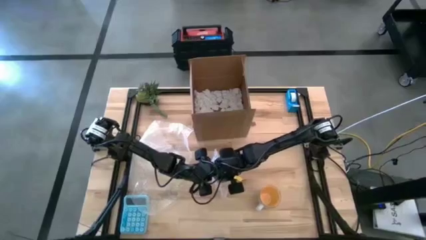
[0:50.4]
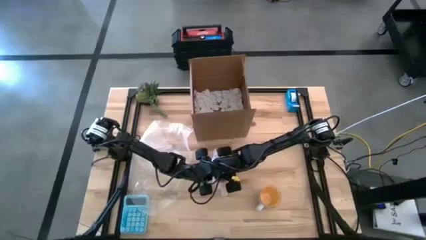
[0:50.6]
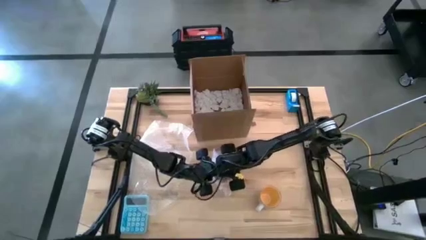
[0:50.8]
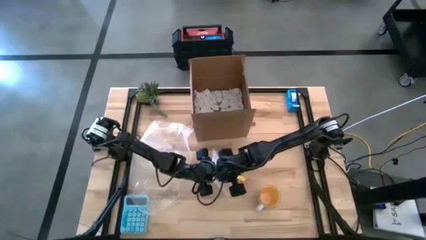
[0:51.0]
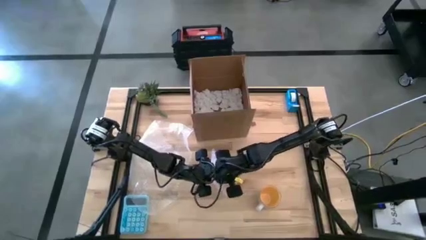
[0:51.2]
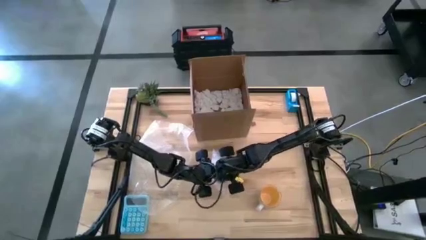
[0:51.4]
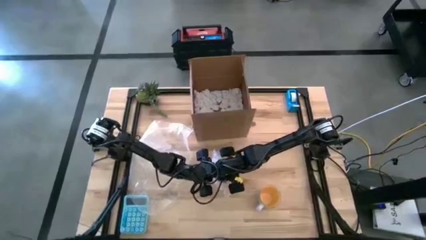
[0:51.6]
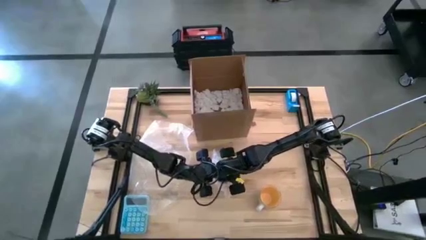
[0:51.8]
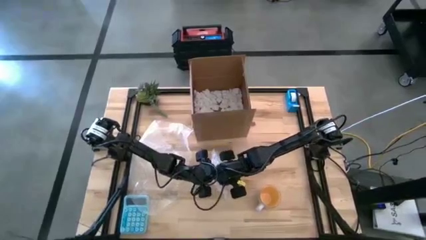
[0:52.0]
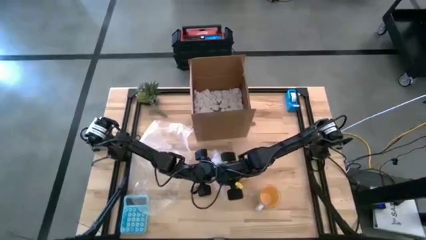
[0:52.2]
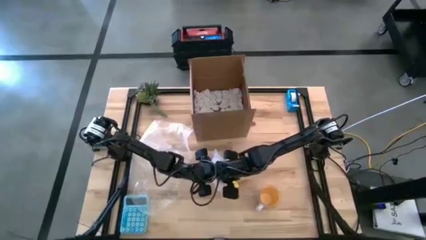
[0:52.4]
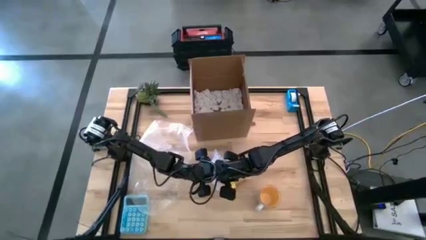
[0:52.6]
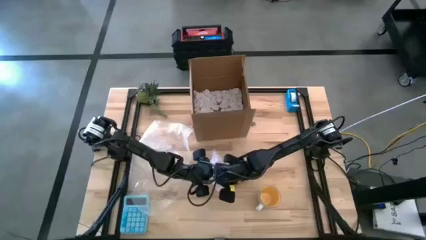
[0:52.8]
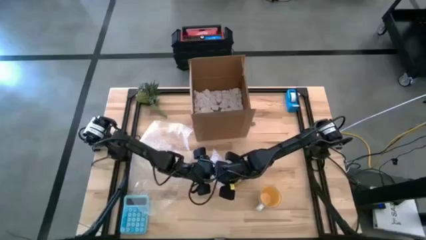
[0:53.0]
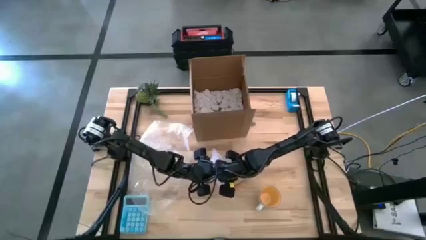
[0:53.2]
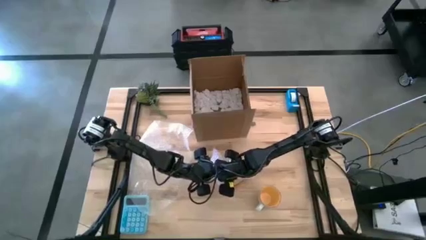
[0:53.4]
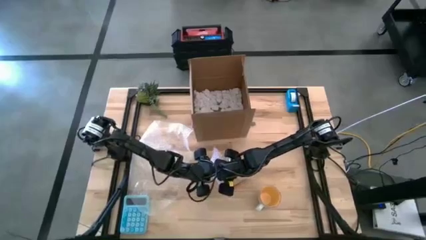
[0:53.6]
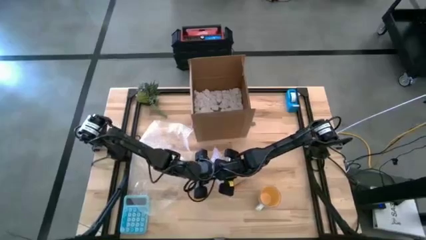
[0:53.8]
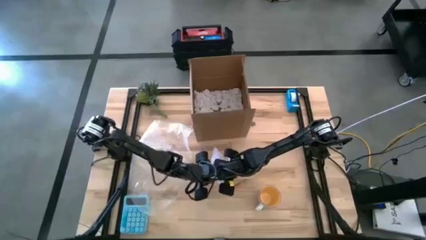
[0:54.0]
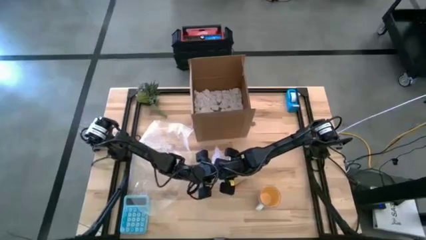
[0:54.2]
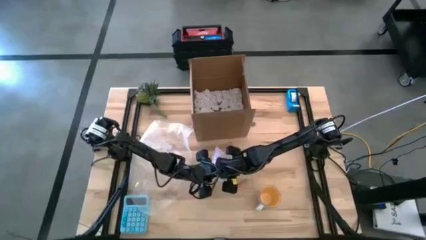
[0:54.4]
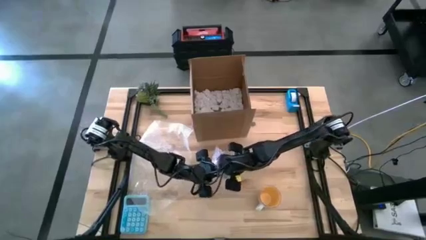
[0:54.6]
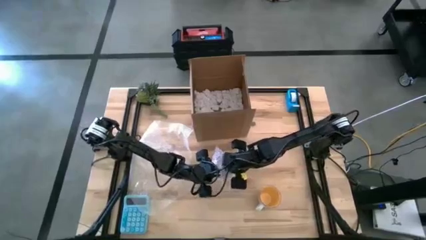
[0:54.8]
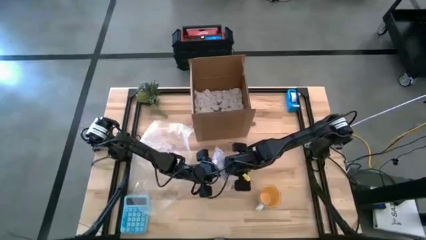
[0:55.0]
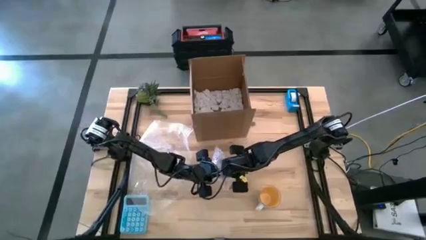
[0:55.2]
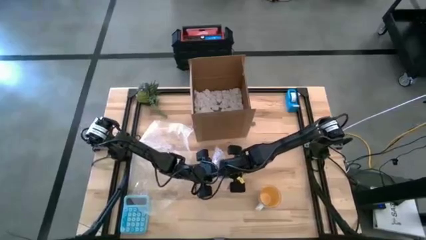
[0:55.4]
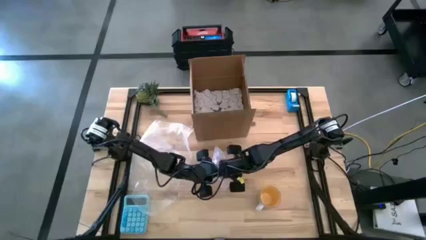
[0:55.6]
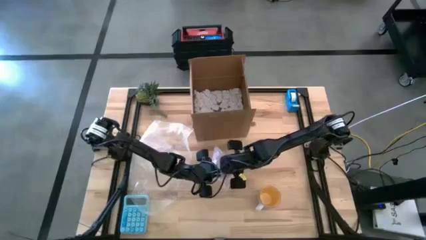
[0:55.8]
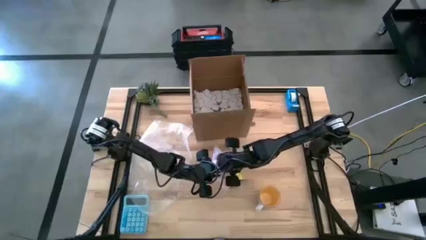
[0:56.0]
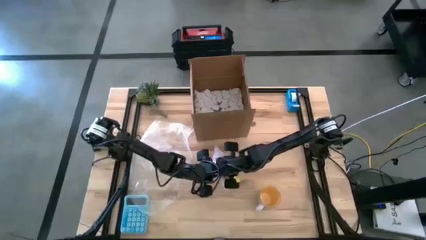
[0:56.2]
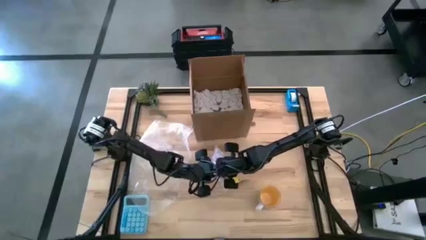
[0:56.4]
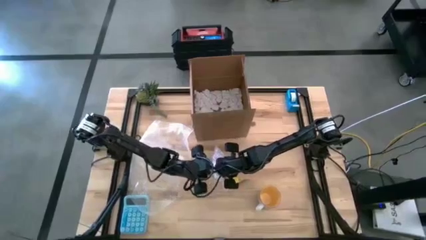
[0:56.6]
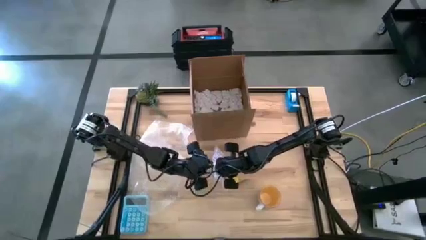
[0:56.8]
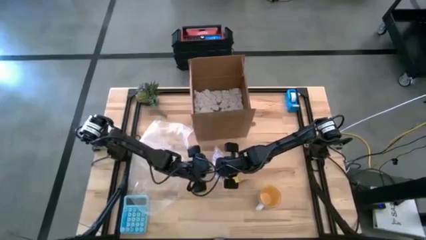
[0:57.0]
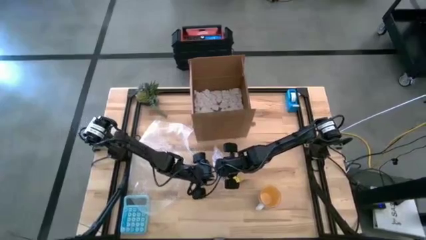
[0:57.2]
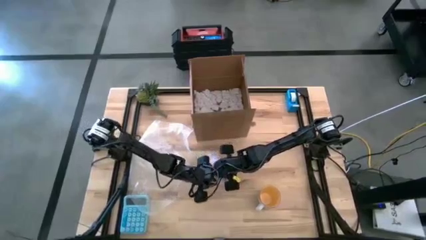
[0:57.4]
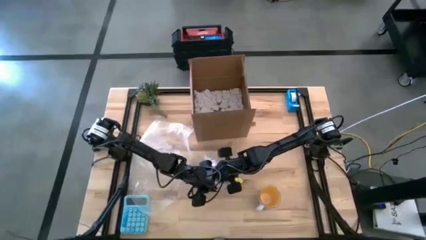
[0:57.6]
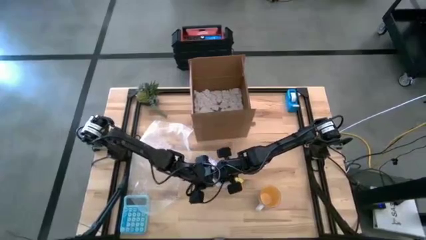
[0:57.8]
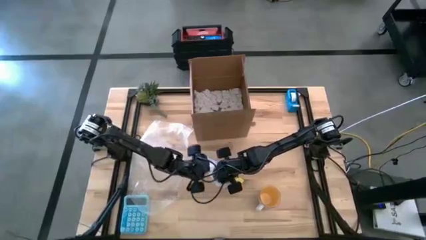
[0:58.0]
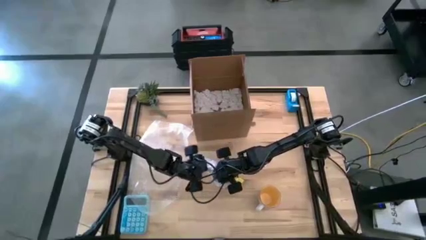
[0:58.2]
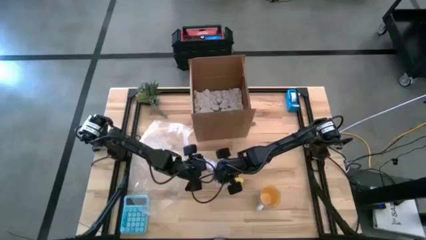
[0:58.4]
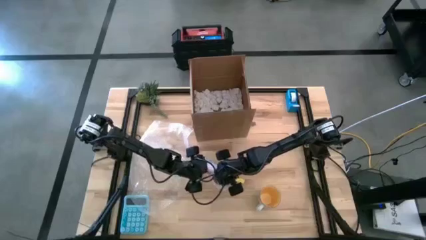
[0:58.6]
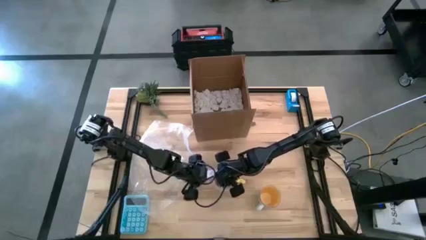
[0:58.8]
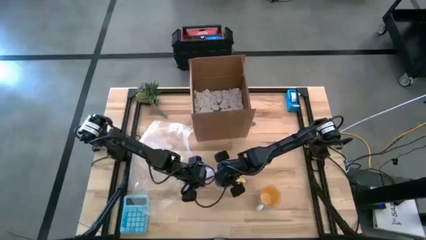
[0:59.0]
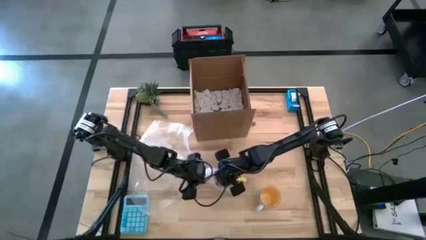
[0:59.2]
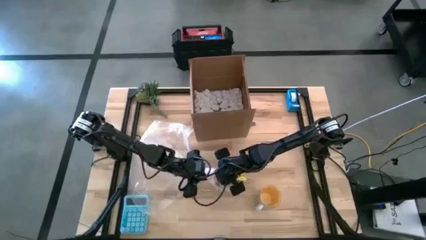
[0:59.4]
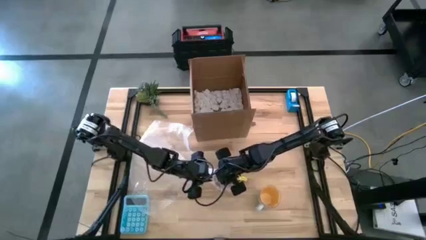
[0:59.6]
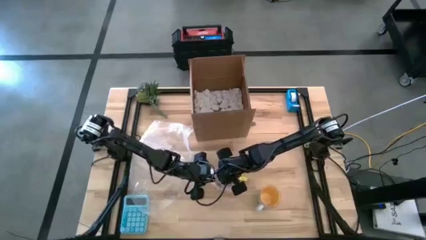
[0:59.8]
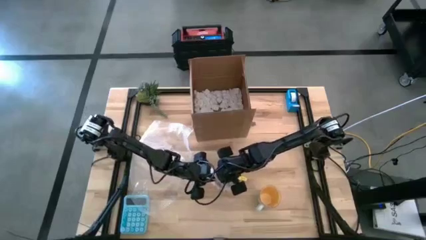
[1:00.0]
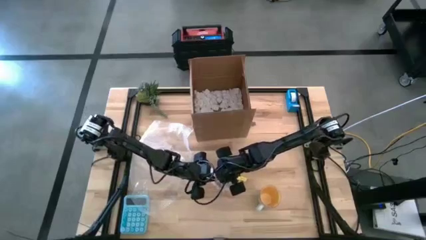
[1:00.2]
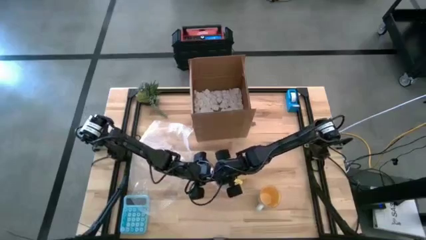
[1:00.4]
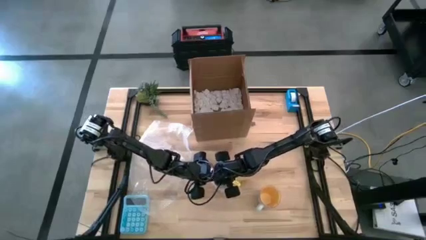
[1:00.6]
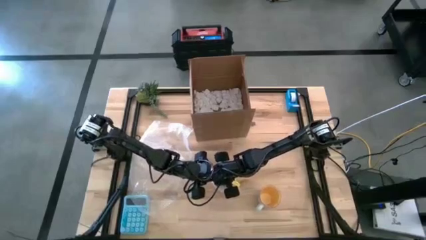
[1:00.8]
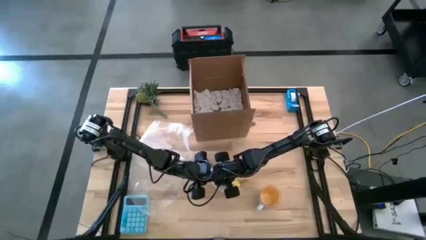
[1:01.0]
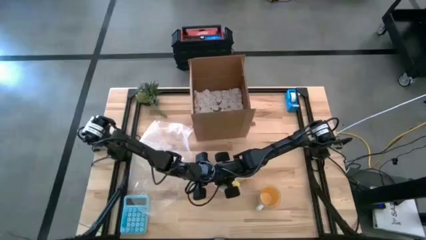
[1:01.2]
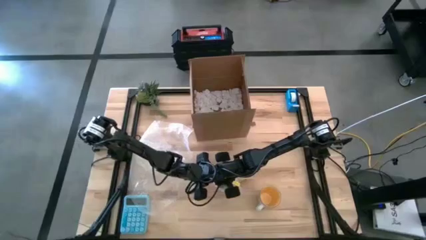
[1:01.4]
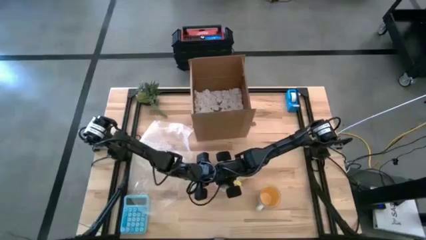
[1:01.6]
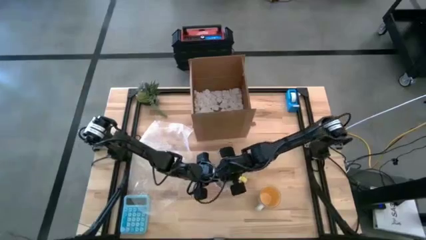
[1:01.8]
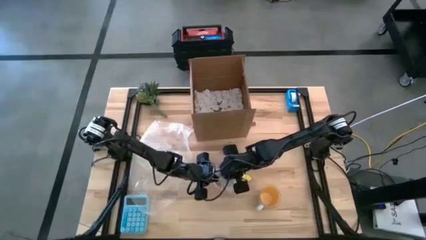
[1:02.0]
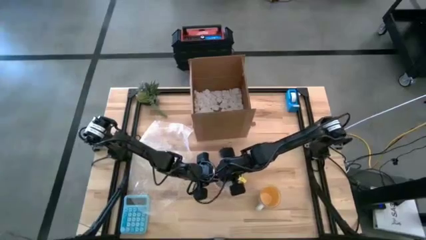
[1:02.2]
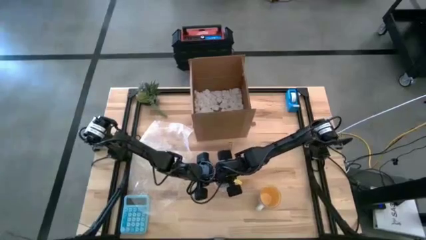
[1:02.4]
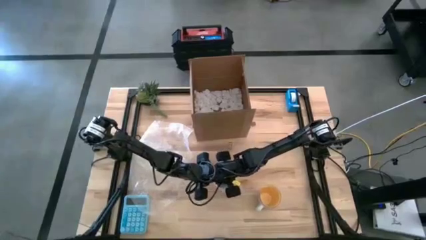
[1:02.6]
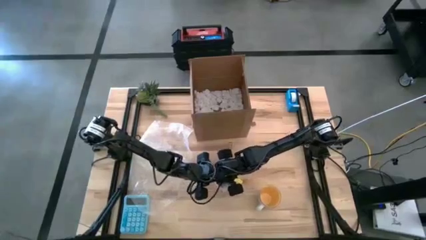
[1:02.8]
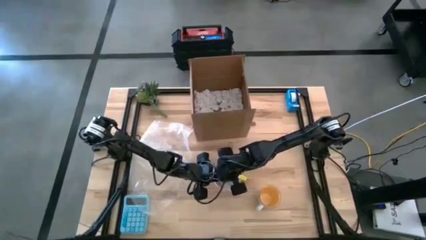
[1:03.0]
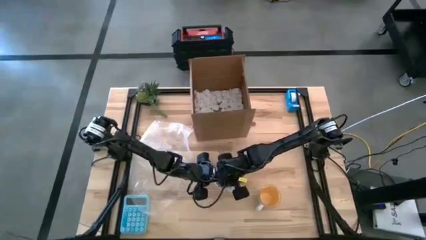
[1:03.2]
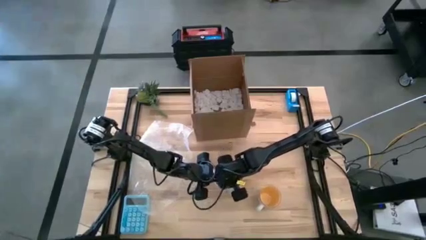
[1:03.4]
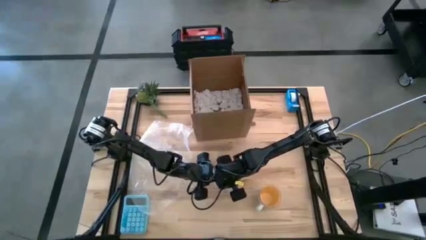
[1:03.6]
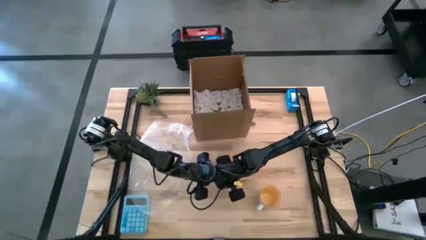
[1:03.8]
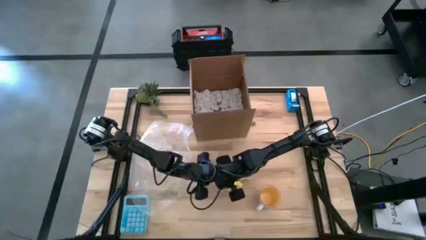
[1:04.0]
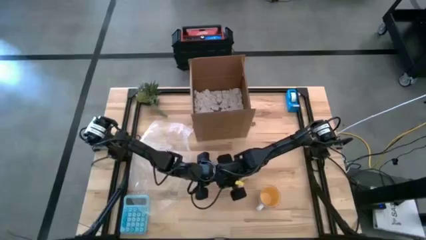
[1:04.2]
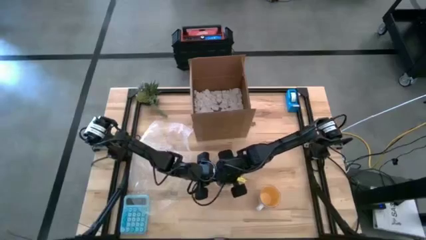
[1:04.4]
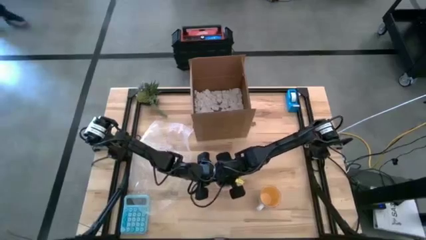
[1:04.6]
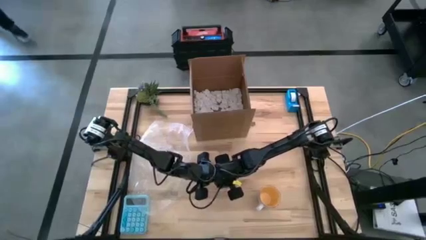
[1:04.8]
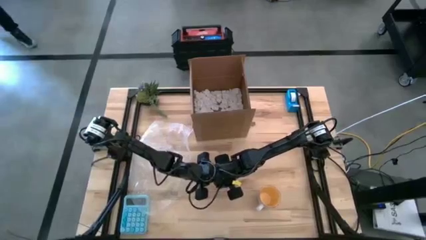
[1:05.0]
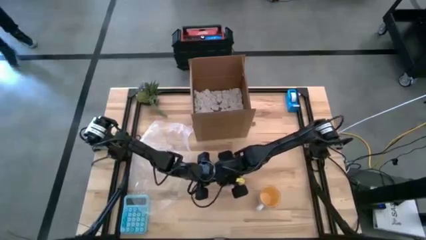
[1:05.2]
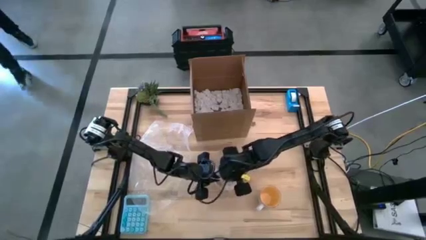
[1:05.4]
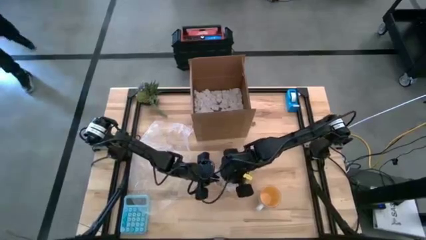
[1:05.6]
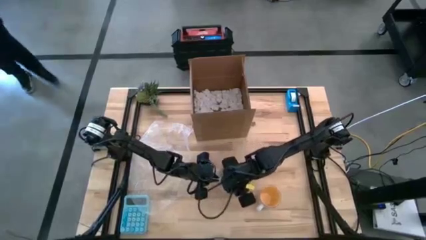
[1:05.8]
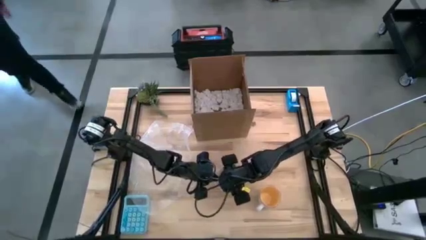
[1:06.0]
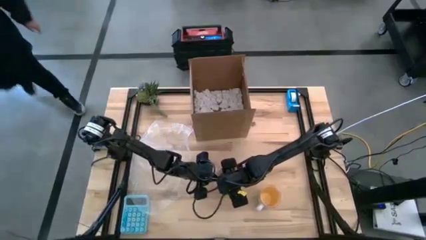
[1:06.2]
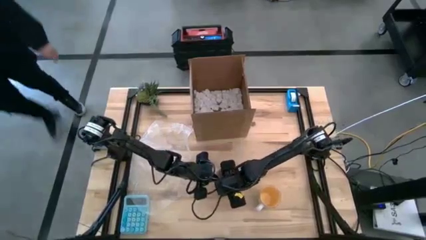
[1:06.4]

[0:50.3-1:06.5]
Task: wrap mug
Wrap the orange mug with bubble wrap

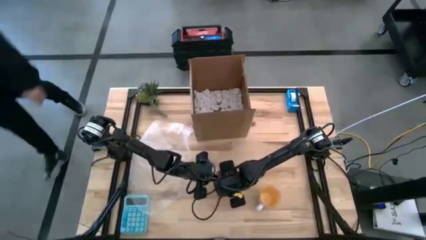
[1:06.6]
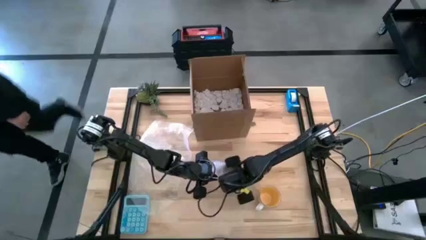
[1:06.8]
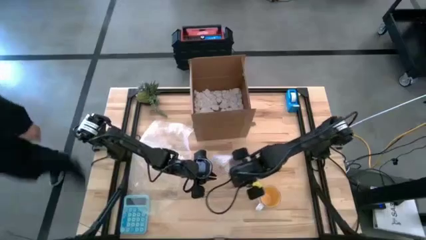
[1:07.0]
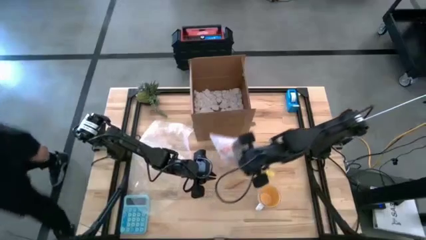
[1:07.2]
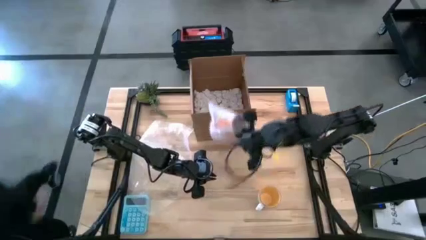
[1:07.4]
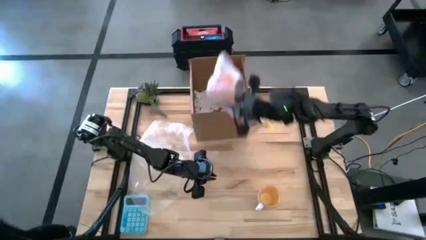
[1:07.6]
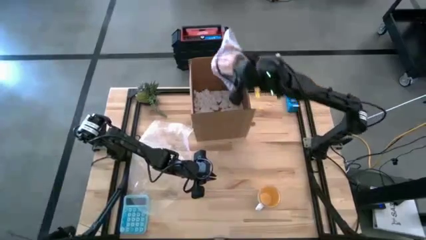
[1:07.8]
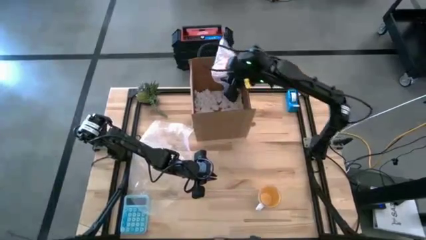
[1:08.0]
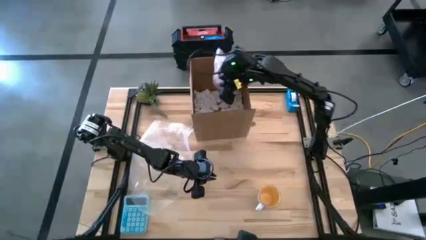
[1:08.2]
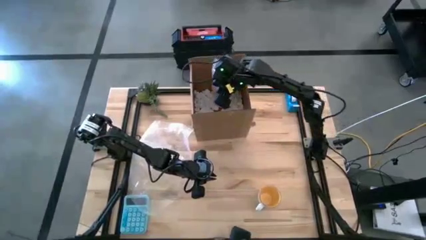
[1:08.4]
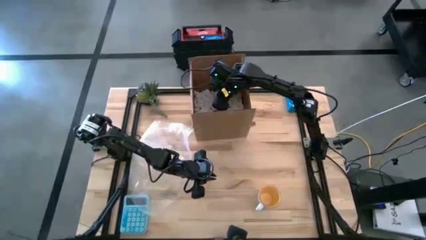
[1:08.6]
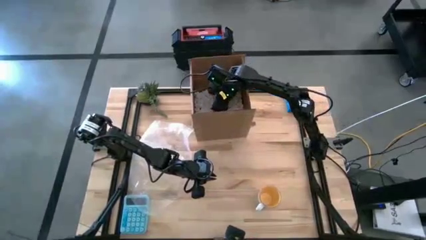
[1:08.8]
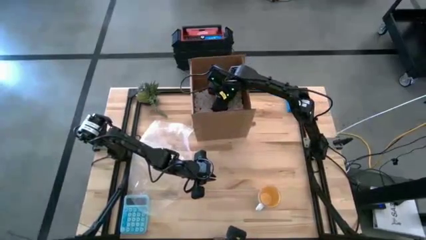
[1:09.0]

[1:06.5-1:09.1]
Put the wrapped orange mug into the box
